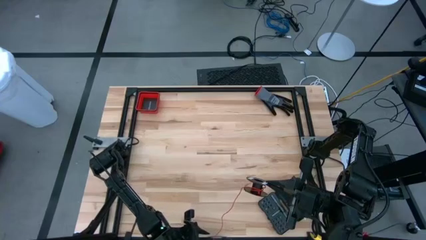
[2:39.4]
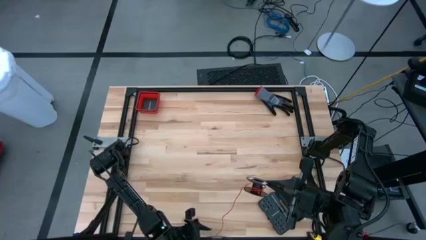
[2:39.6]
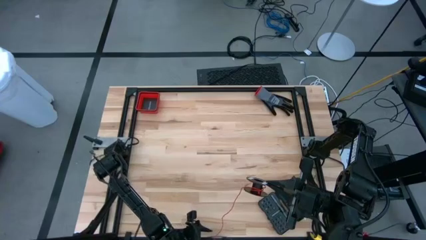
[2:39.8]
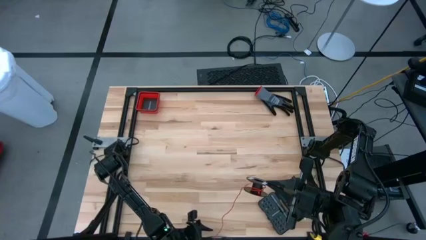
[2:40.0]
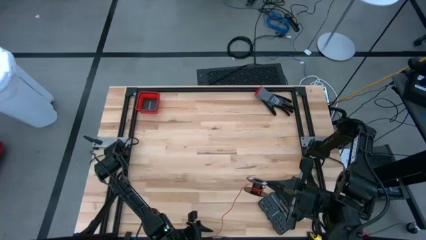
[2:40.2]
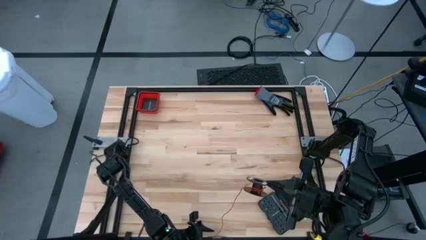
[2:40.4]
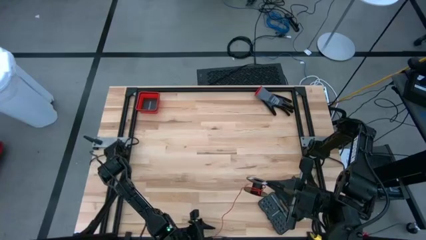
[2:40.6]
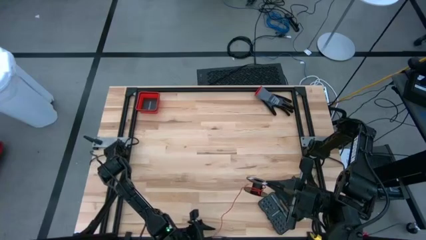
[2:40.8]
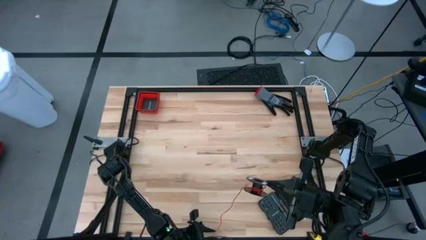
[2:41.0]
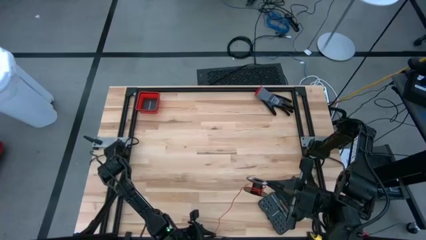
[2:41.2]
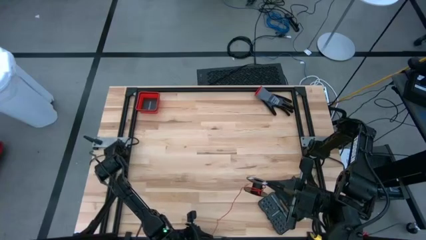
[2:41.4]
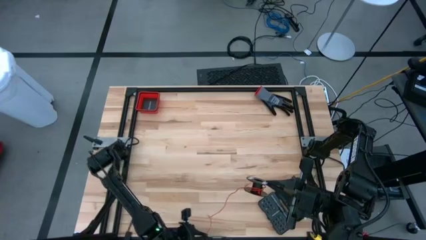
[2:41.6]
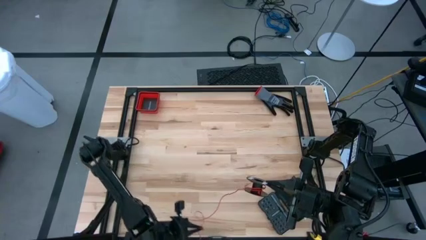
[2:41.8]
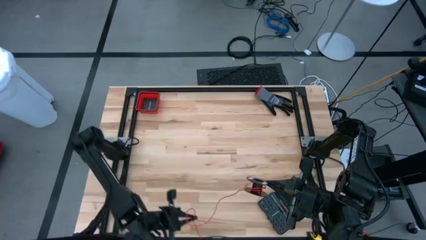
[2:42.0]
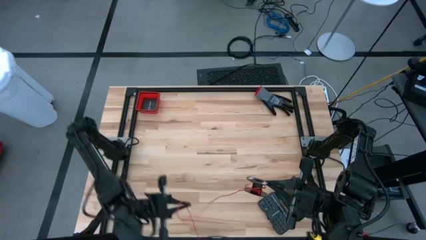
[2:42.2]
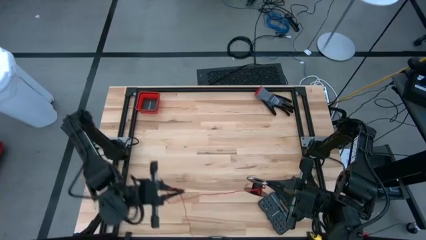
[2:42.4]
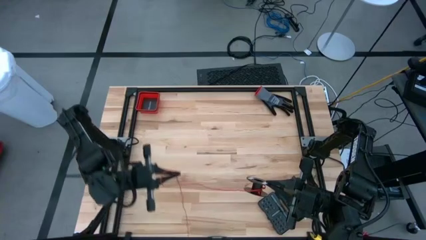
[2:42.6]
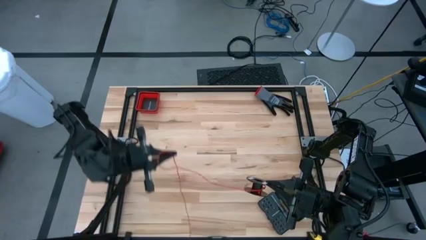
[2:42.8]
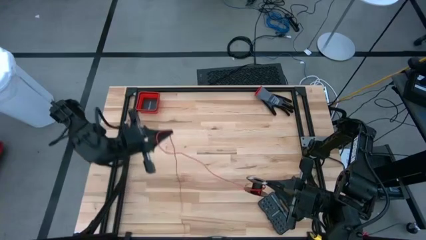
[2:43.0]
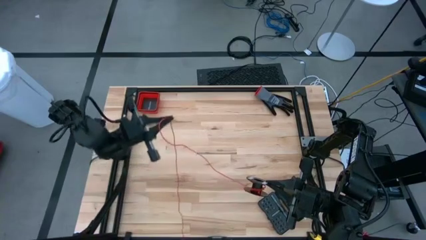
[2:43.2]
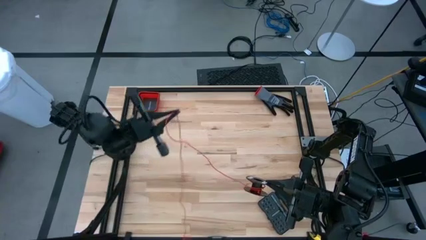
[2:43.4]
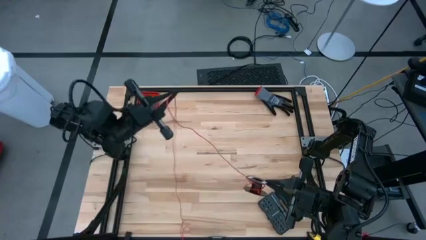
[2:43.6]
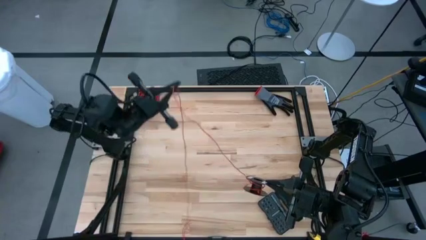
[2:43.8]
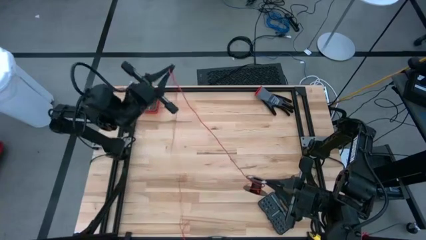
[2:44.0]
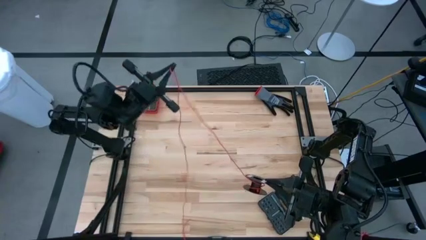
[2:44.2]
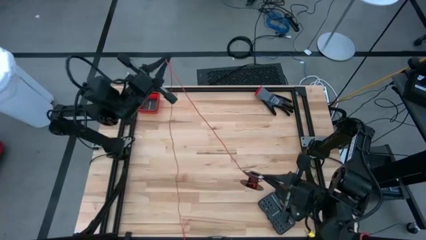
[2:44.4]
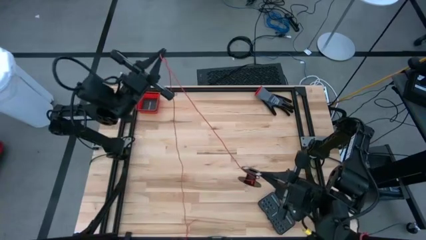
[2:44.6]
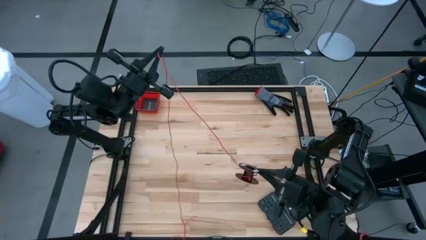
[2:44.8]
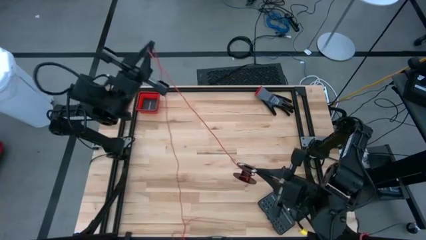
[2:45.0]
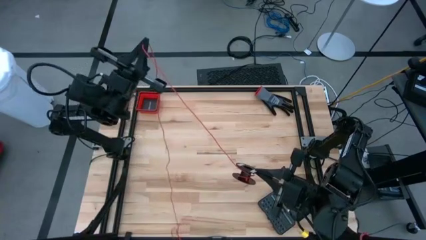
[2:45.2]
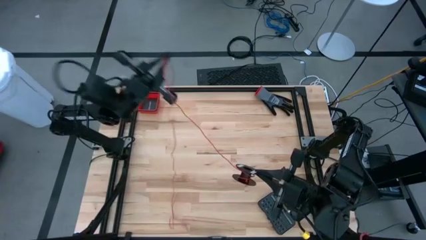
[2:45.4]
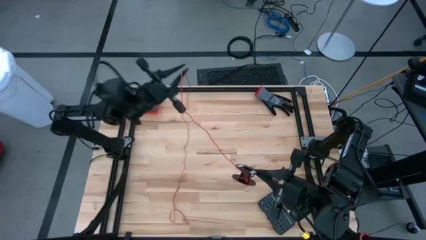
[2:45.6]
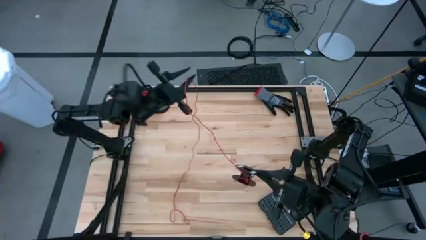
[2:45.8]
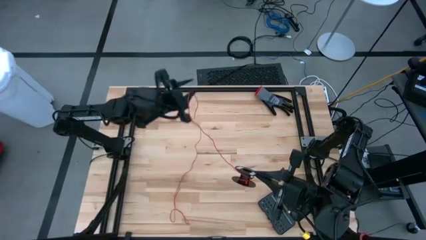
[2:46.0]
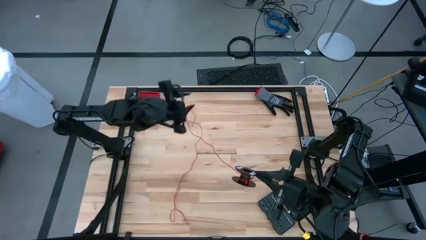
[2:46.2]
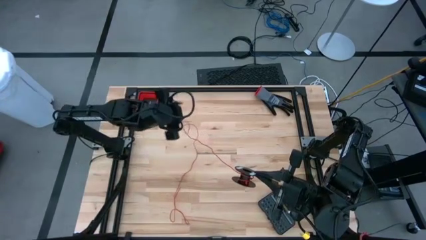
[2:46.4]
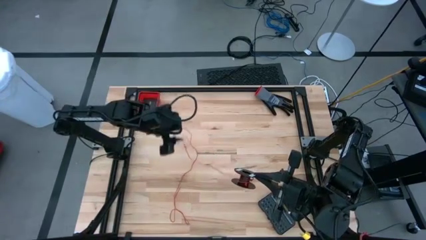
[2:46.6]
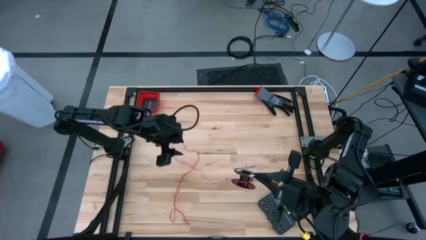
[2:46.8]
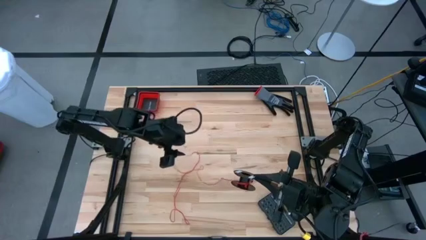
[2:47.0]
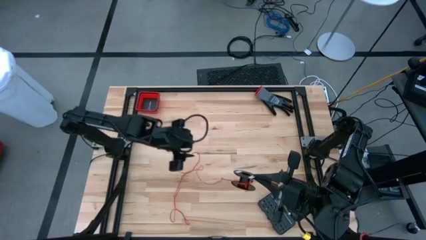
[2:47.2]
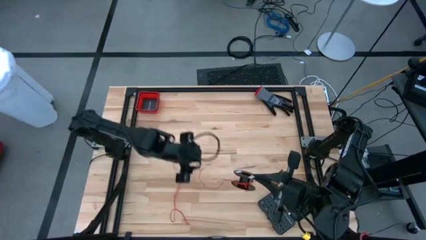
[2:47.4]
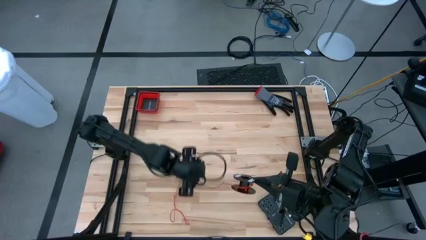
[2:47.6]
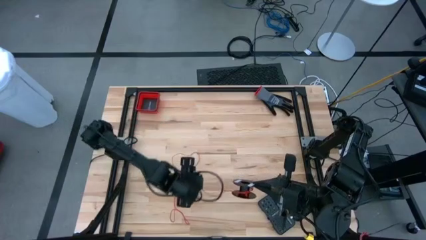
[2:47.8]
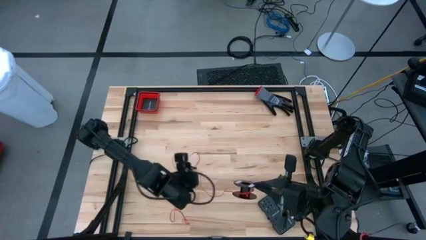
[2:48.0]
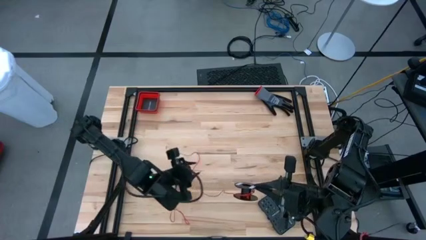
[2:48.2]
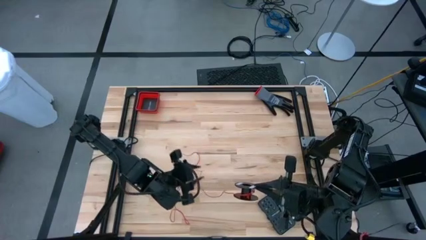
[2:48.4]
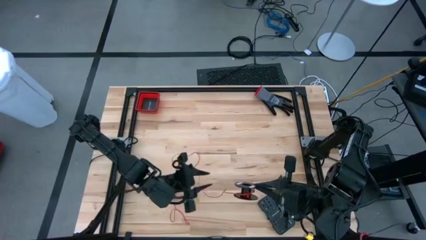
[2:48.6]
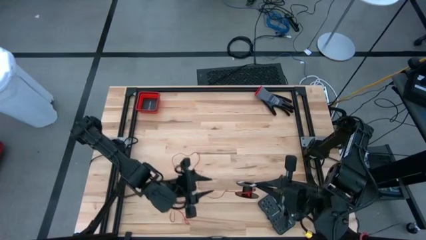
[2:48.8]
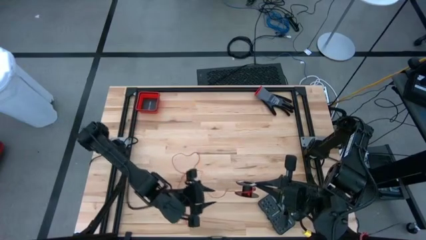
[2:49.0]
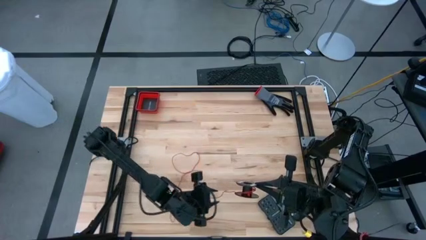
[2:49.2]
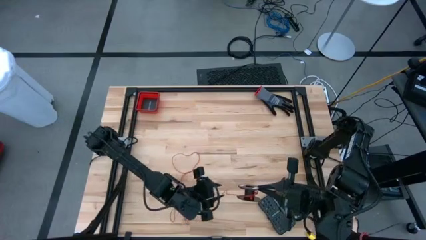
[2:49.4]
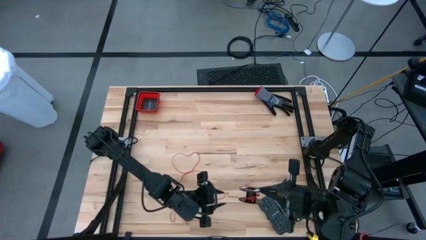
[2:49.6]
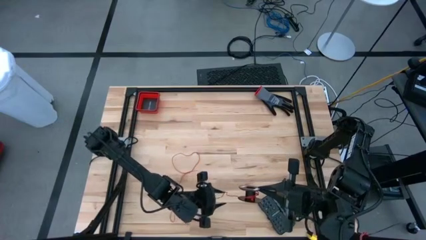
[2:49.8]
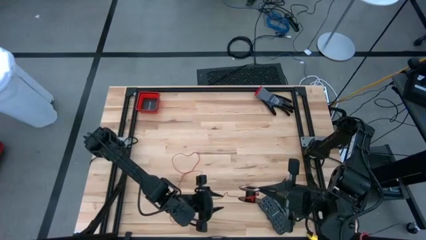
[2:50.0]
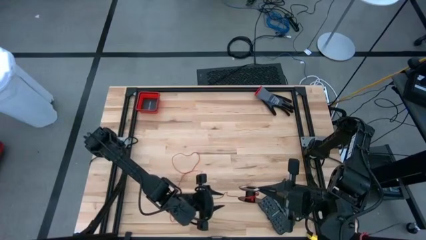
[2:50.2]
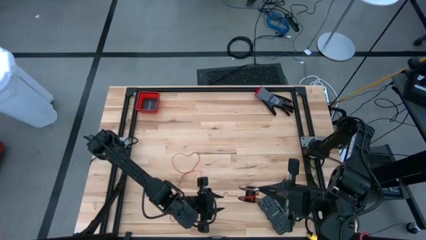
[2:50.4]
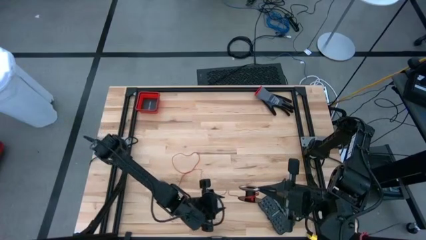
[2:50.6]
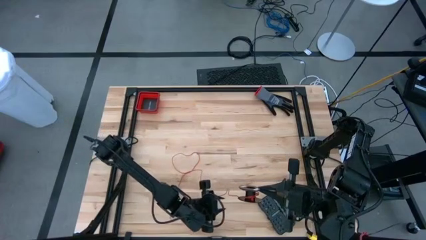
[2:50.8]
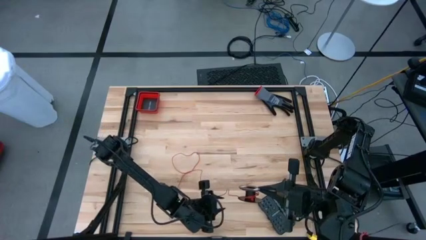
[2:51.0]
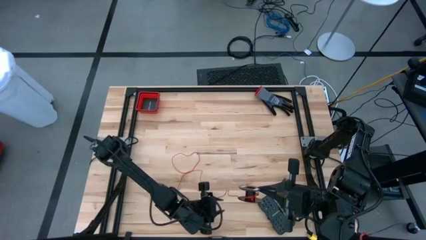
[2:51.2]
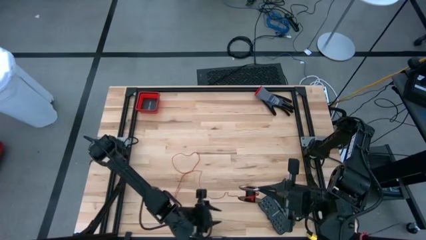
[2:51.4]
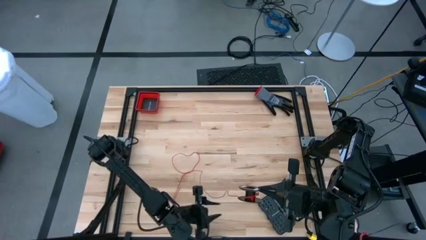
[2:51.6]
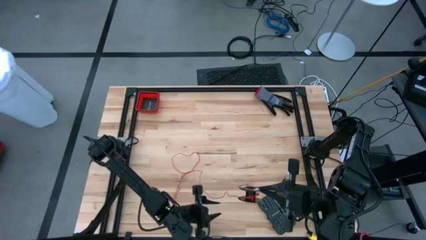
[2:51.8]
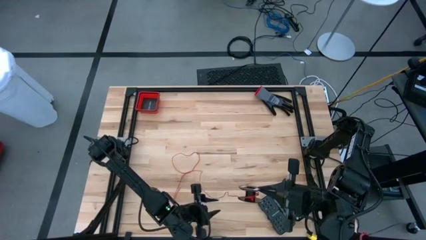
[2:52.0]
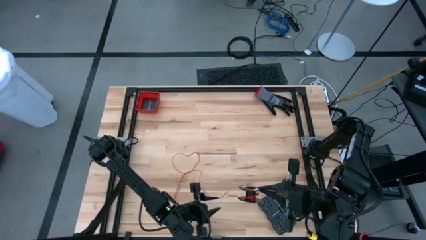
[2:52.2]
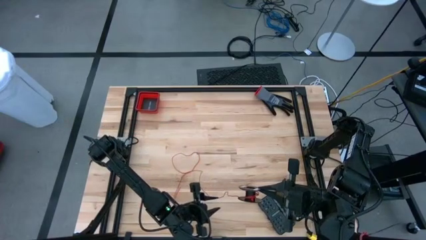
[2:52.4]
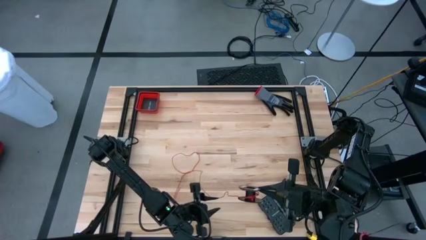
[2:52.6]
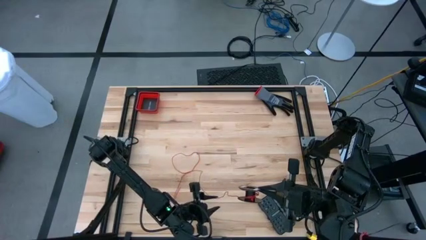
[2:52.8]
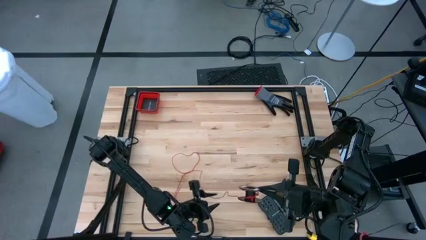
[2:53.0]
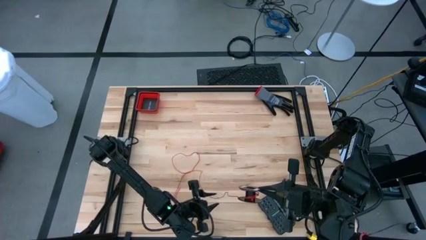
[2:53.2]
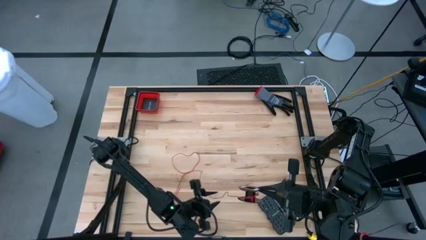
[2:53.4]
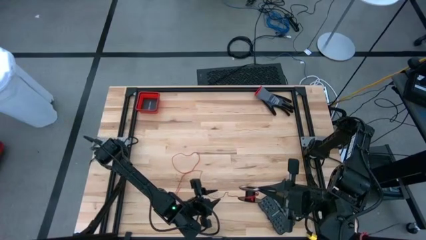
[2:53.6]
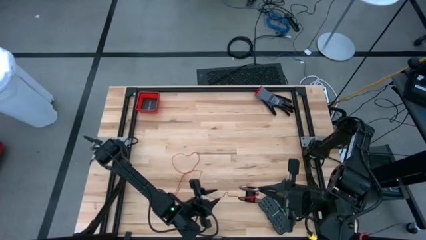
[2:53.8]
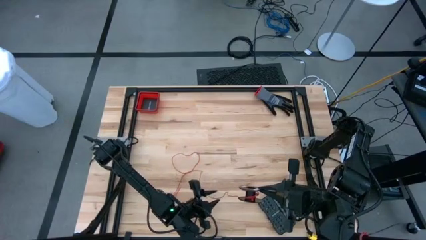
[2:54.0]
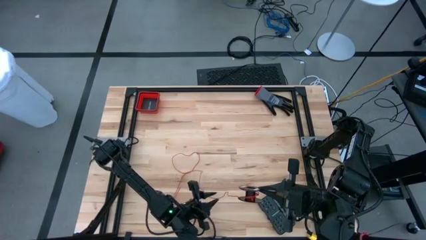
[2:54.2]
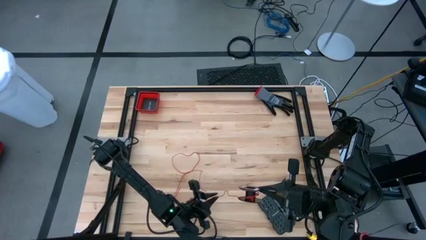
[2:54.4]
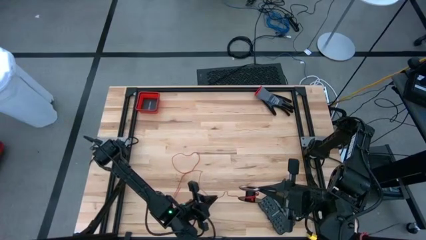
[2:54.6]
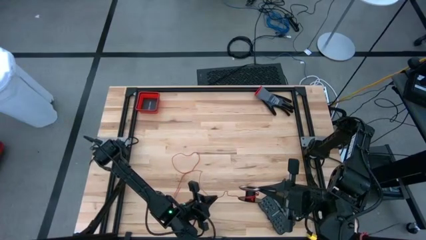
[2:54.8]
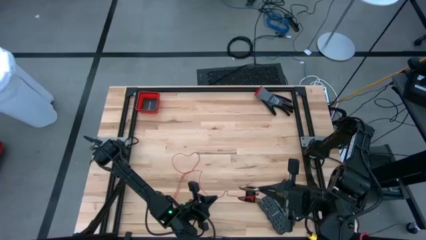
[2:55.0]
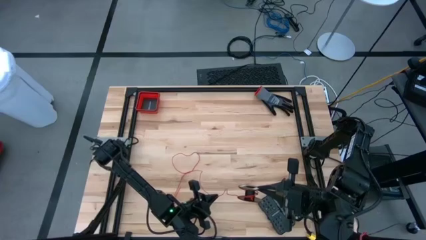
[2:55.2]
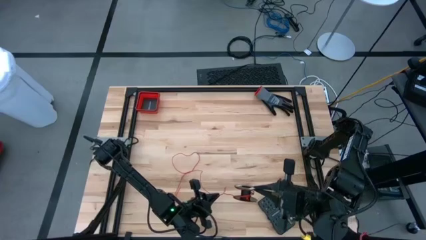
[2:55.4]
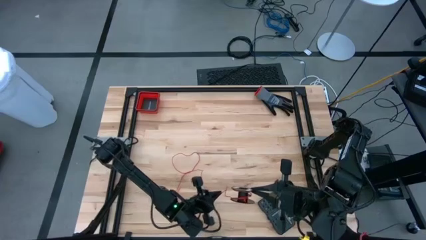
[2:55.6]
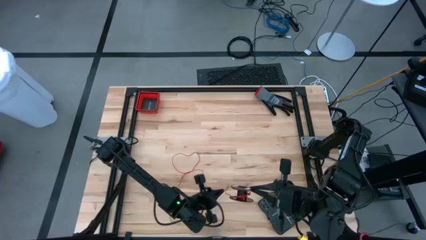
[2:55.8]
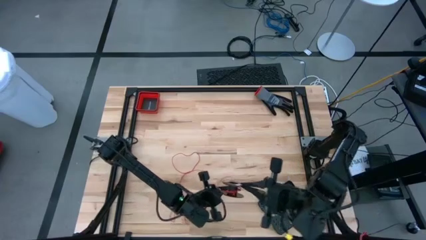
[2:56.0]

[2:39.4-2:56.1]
Task: Coil cords
Coil the red wire onto the spool
